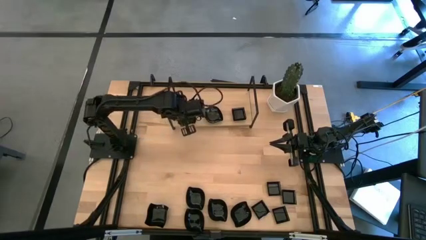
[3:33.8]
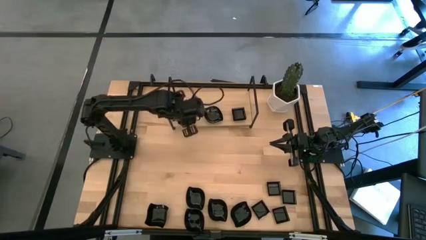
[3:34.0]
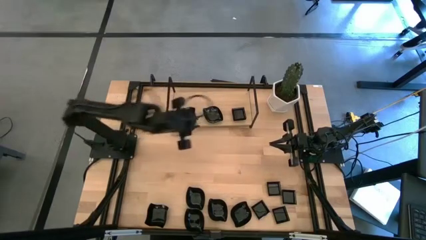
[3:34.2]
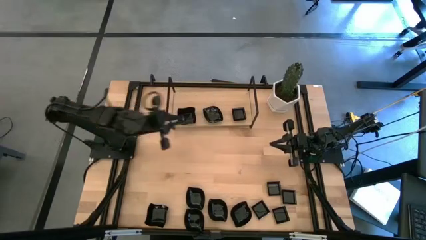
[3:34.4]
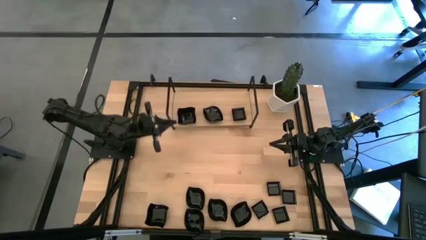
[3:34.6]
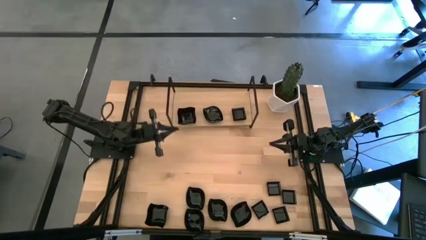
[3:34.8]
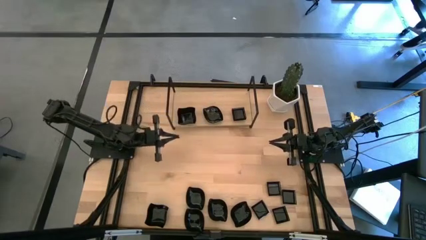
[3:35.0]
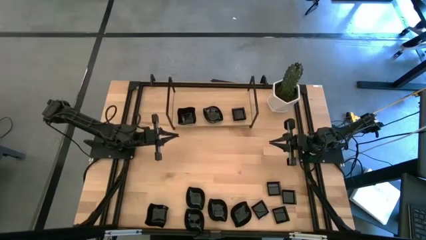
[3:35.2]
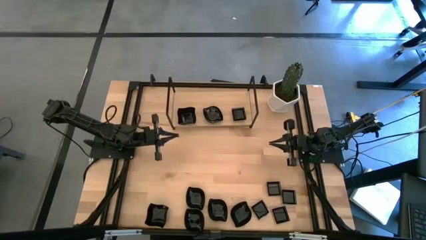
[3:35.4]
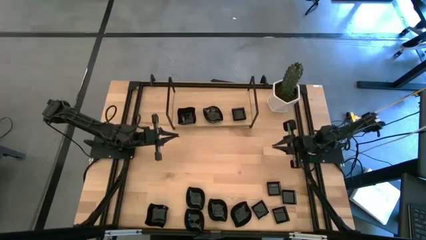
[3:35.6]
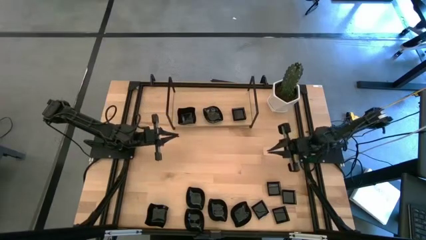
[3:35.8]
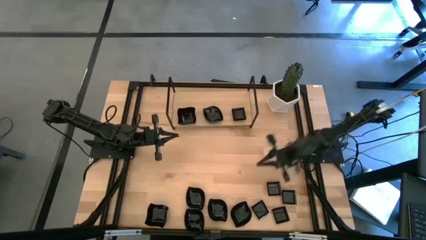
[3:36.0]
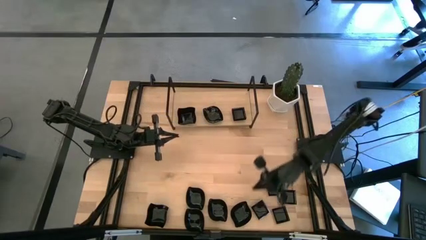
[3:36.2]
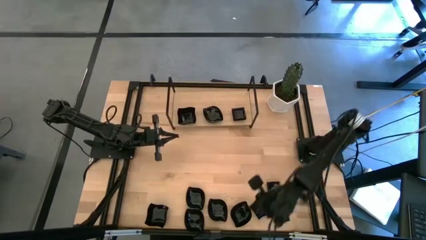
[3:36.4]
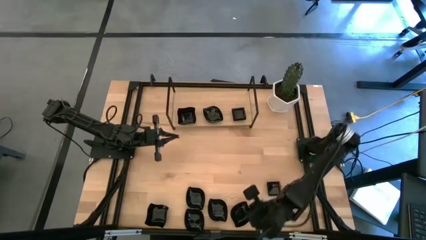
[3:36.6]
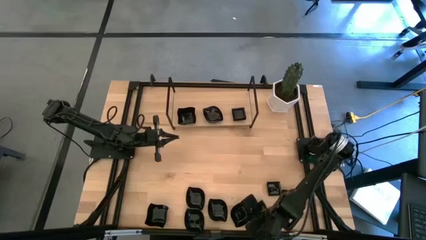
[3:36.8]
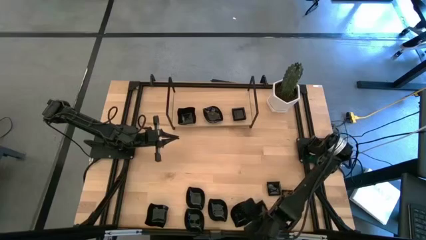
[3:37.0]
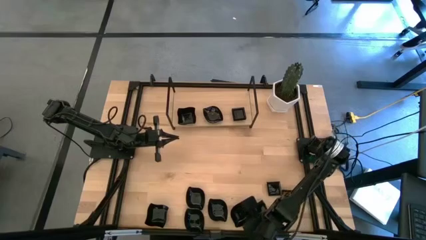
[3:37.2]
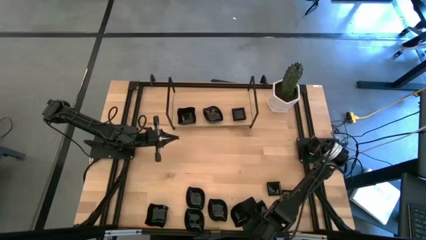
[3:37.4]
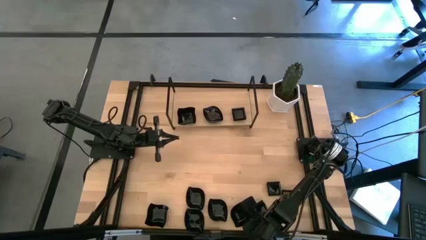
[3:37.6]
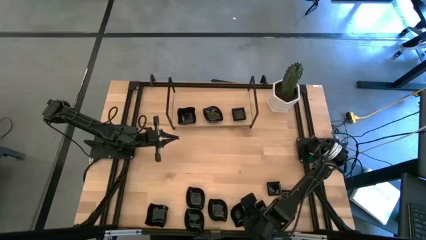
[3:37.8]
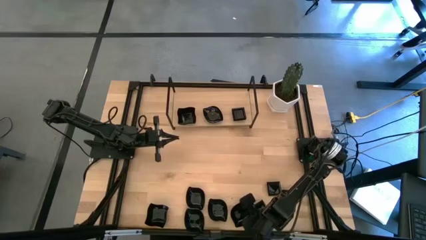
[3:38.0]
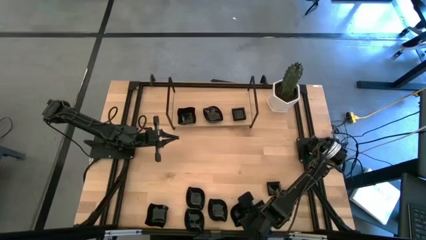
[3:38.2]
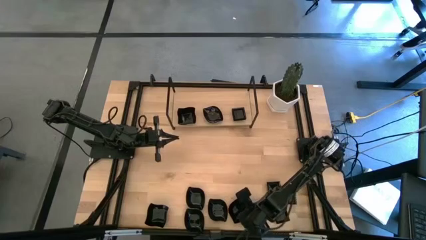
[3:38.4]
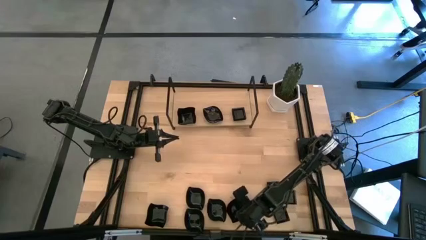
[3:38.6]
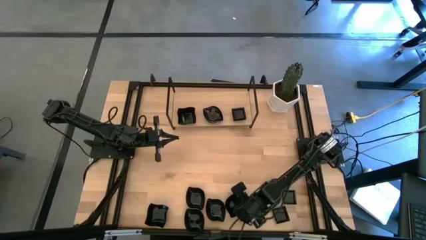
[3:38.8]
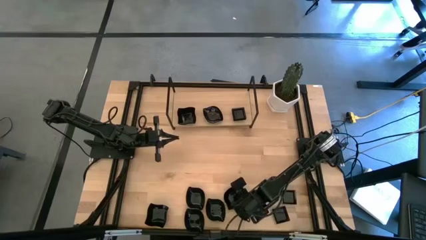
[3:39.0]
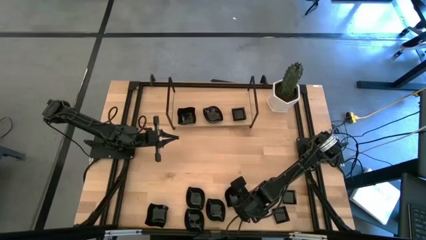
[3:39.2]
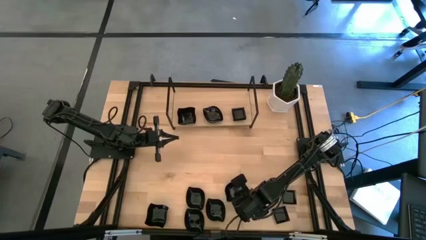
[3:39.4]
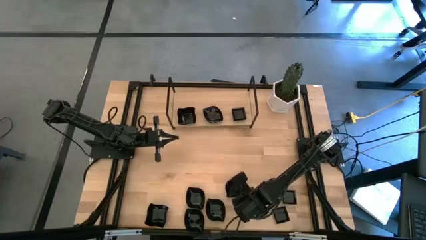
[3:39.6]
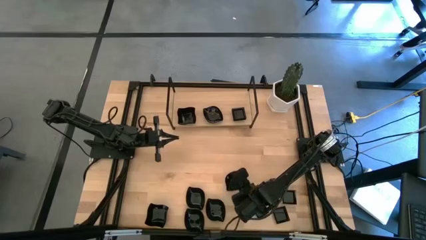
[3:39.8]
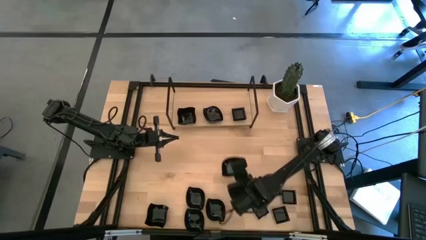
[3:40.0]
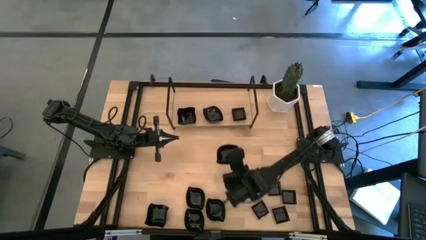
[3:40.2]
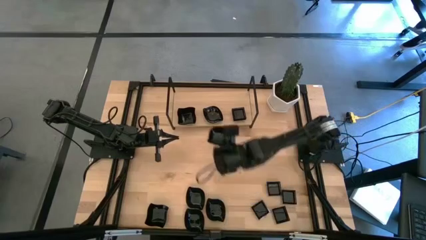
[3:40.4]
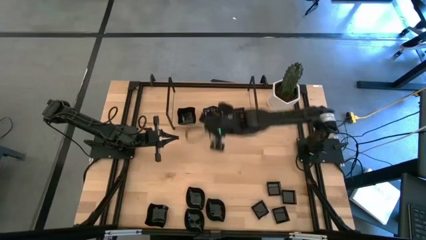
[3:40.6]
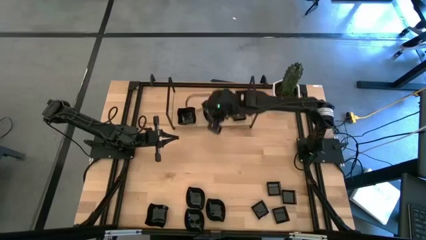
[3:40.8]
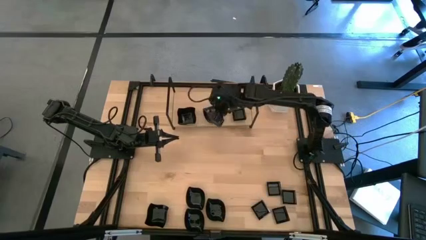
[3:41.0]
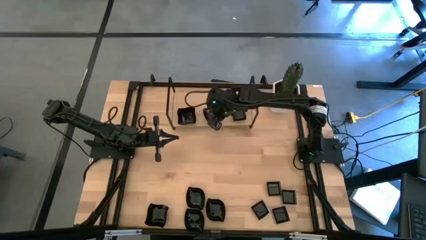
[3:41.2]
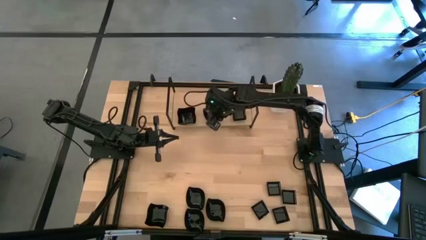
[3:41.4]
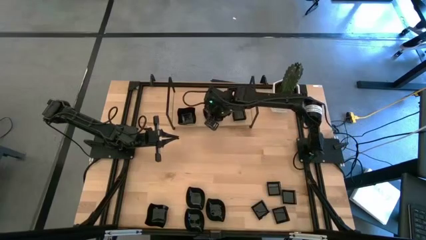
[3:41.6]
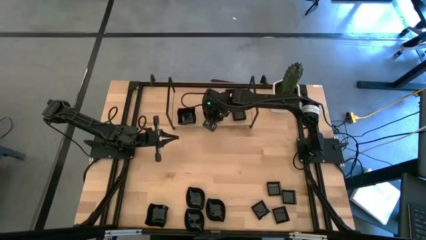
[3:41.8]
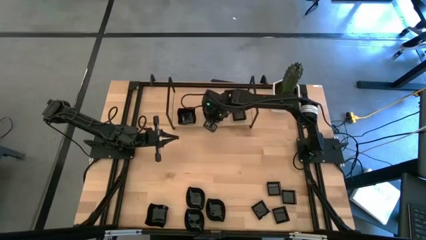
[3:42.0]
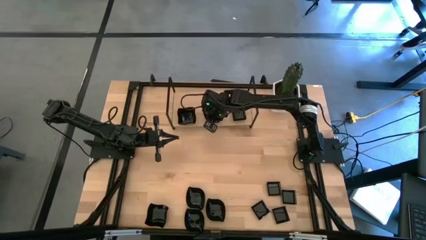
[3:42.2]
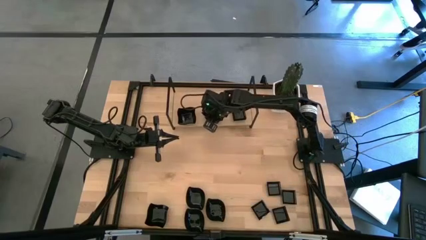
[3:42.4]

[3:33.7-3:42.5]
Task: Pick & Place Mini shaped plates
Stack the black leaf-shaped plate on top of the black leaf-shaped plate on the shelf

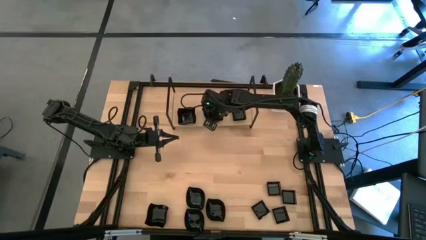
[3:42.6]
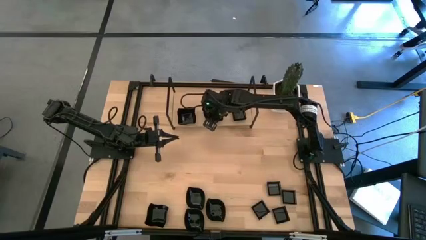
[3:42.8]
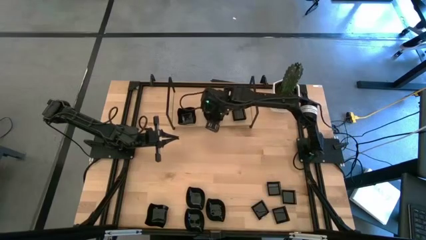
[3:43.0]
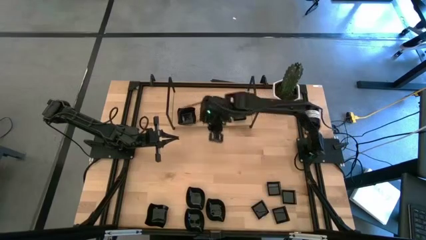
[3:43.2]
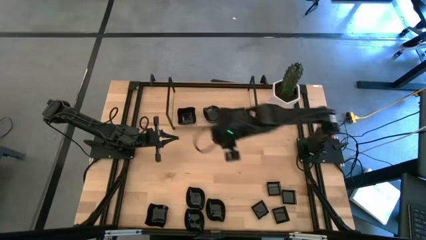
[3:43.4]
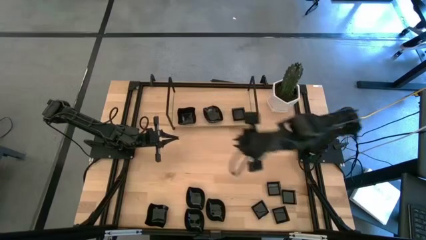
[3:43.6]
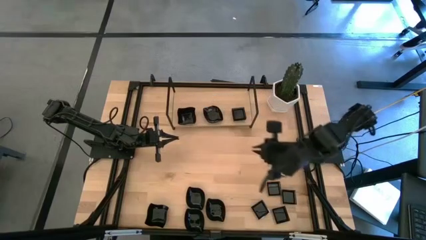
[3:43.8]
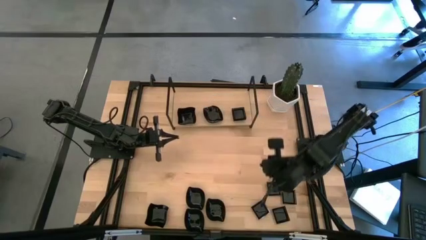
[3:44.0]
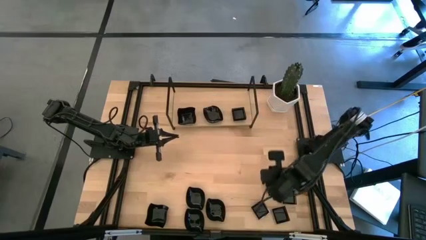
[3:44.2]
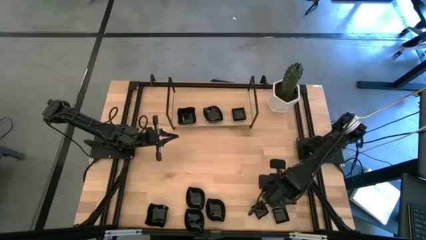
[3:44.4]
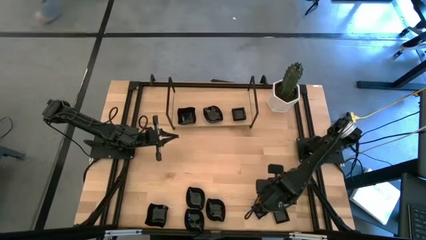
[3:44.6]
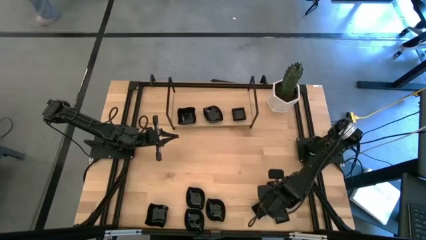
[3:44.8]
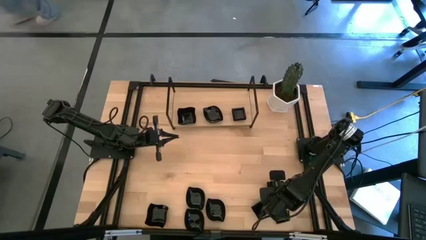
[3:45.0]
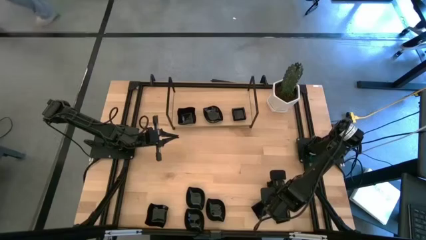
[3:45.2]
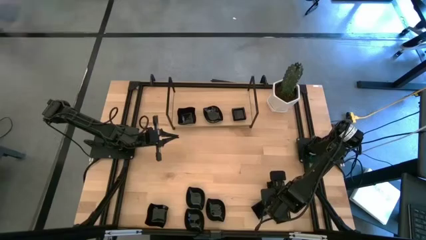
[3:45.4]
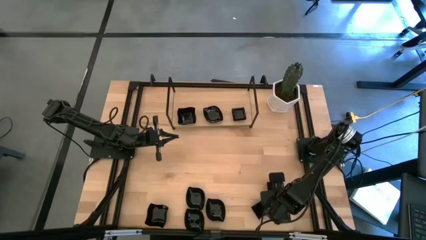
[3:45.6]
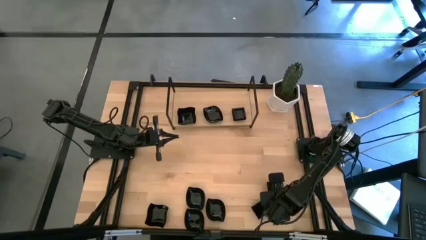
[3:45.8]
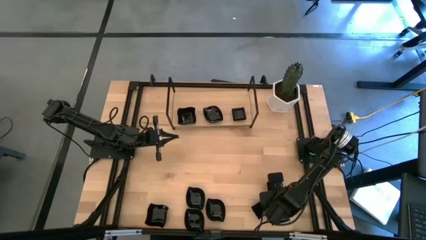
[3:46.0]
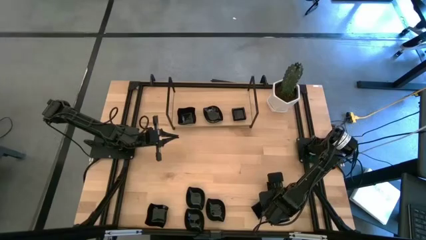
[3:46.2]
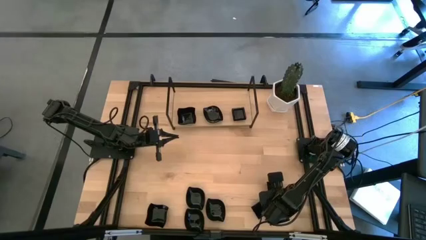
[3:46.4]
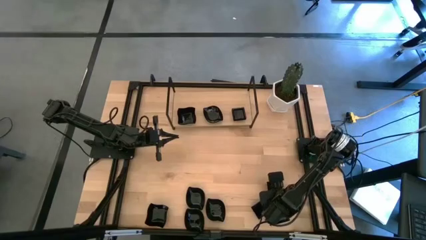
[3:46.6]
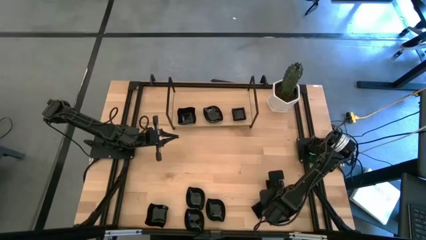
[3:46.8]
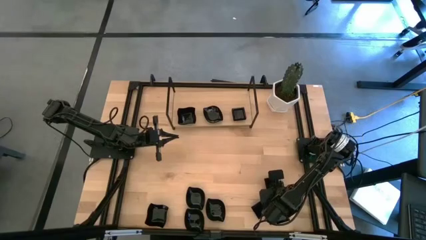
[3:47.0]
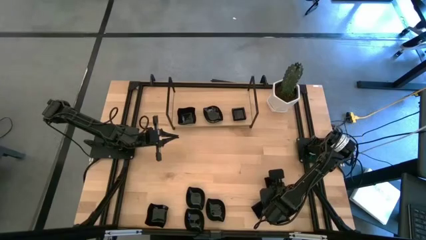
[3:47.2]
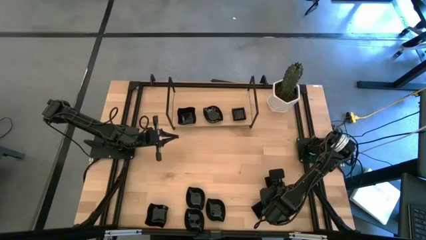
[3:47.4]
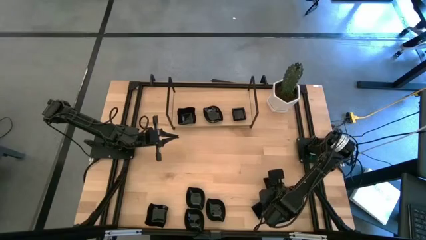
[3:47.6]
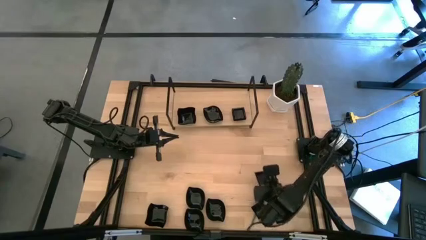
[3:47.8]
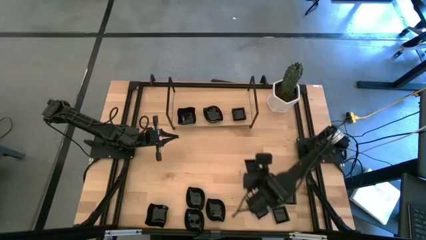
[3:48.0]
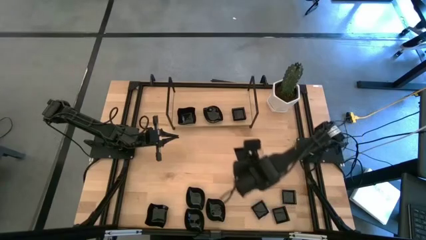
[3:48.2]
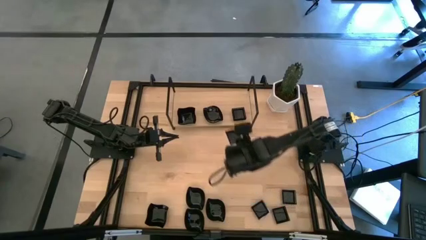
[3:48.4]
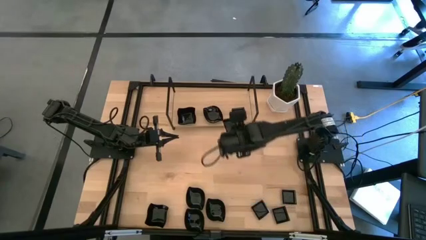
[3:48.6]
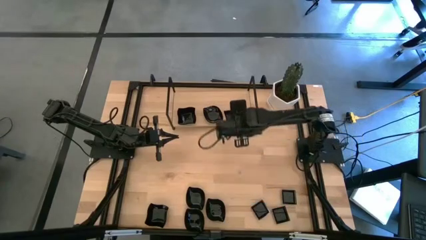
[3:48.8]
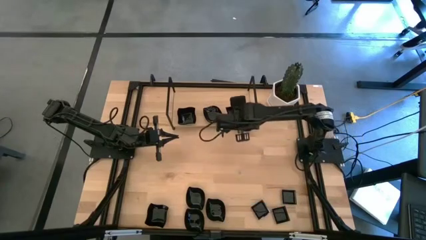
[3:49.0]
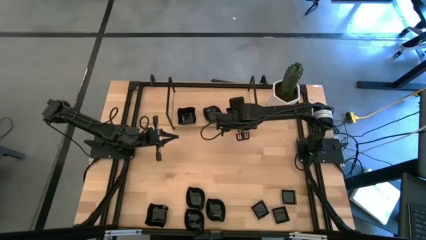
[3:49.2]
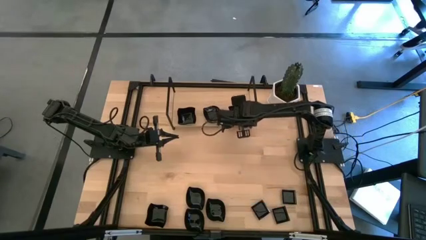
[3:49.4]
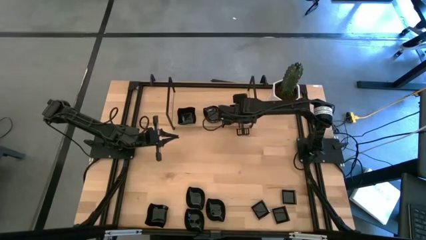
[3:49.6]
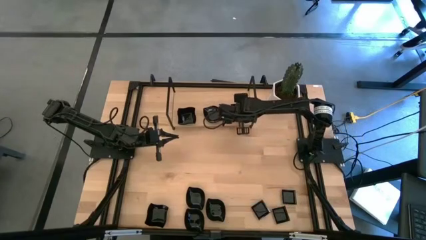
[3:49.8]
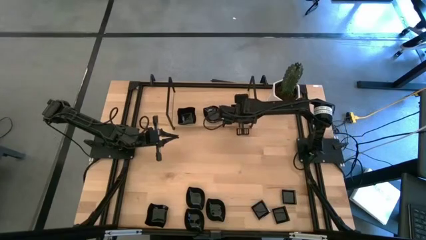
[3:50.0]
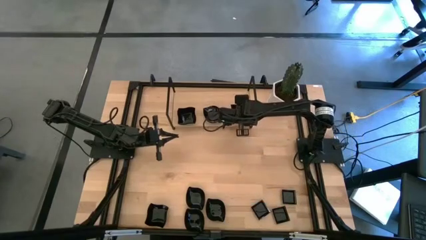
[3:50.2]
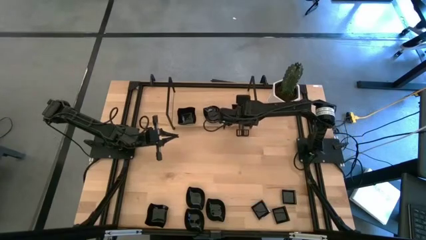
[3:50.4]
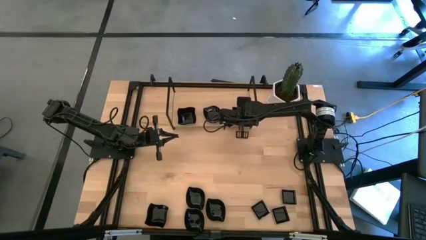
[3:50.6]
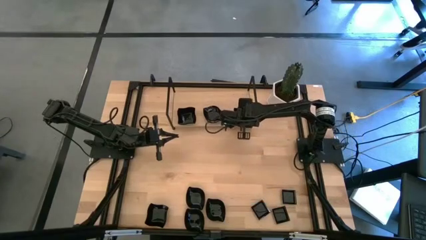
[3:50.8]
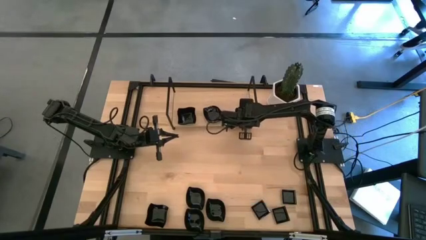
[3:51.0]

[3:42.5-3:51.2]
Stack the black square plate on top of the black square plate on the shelf
